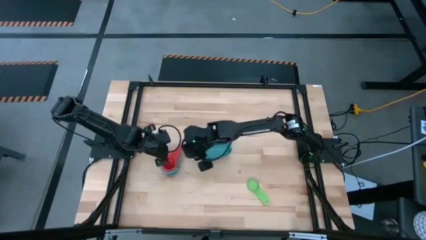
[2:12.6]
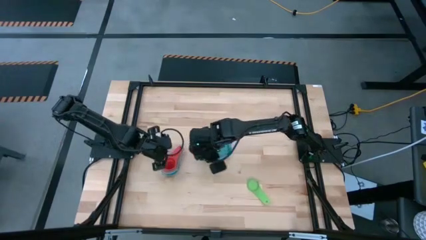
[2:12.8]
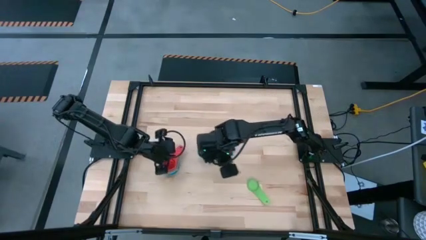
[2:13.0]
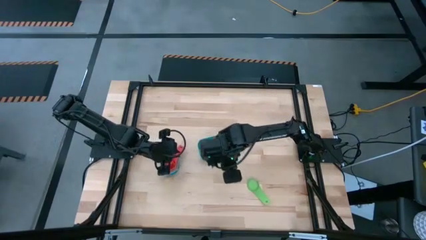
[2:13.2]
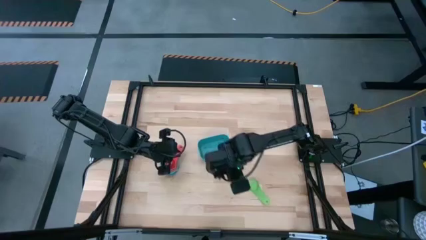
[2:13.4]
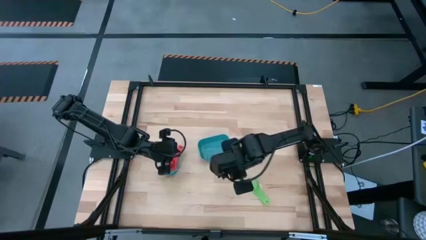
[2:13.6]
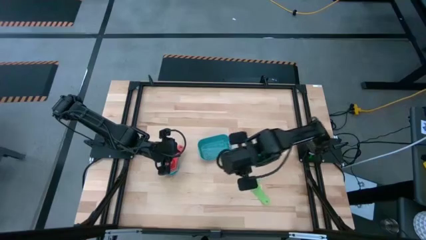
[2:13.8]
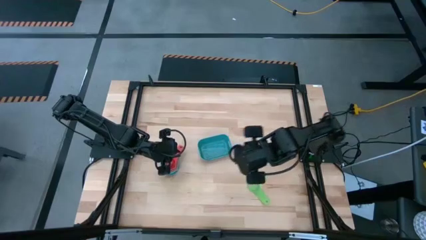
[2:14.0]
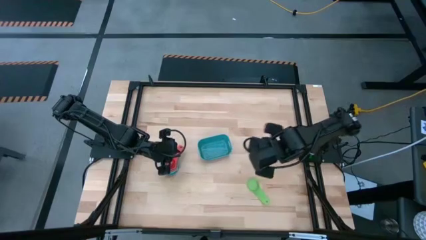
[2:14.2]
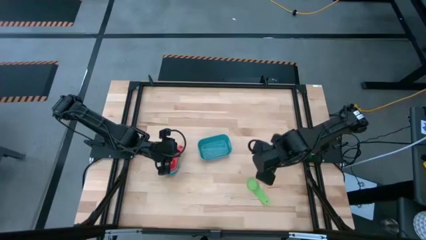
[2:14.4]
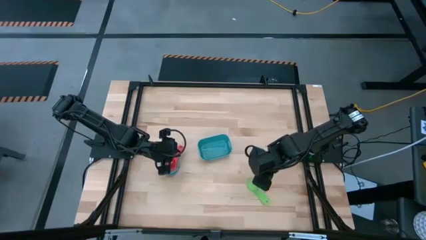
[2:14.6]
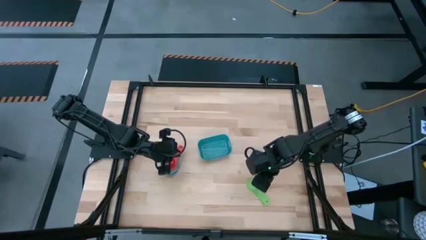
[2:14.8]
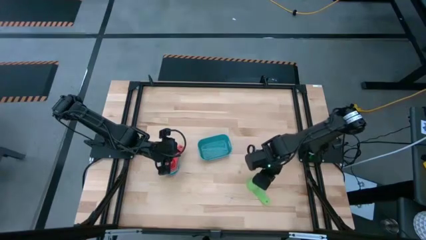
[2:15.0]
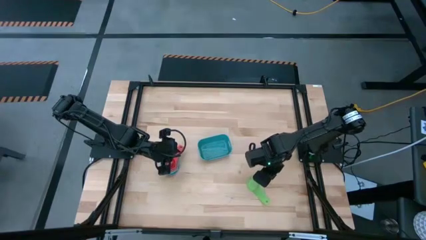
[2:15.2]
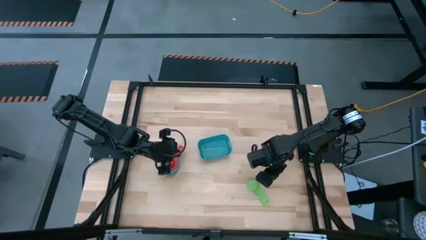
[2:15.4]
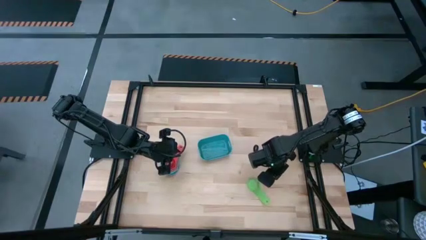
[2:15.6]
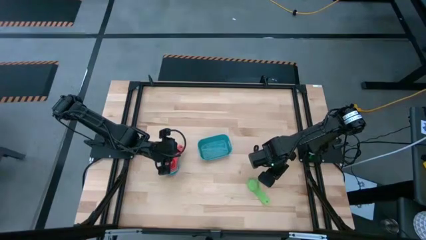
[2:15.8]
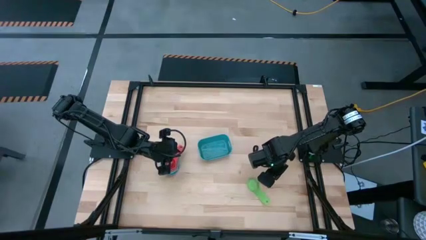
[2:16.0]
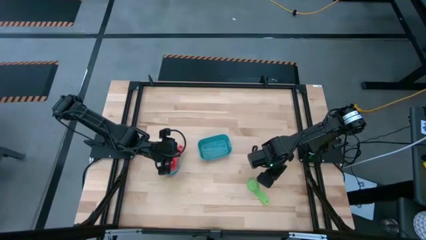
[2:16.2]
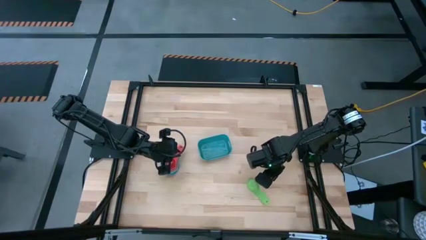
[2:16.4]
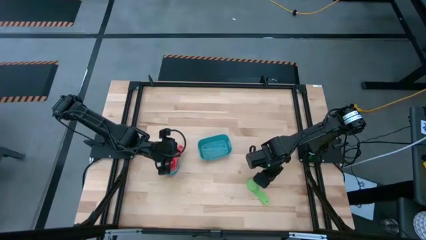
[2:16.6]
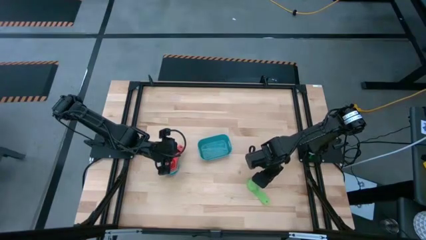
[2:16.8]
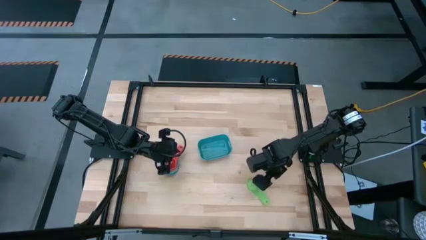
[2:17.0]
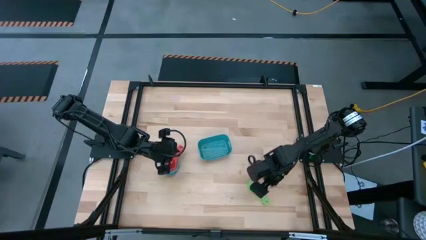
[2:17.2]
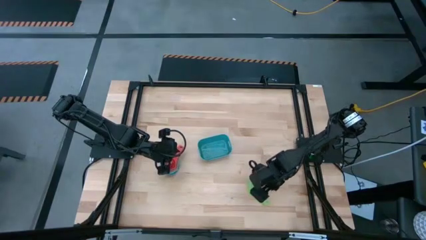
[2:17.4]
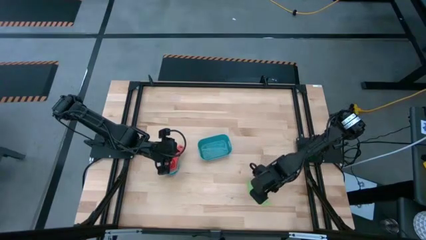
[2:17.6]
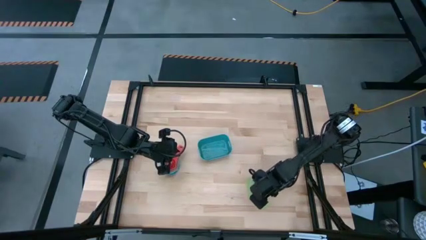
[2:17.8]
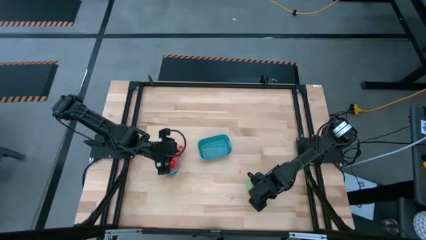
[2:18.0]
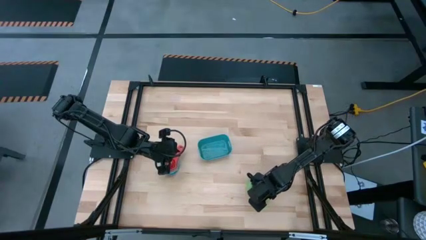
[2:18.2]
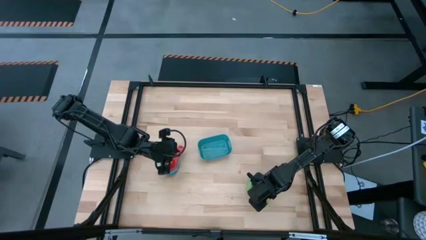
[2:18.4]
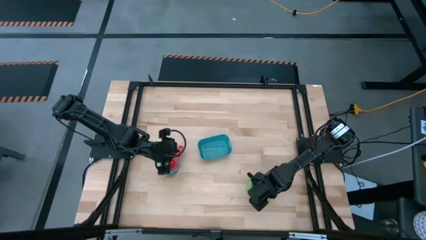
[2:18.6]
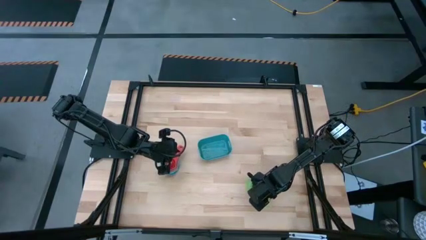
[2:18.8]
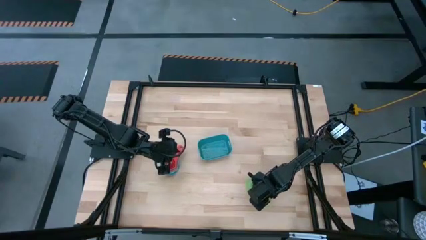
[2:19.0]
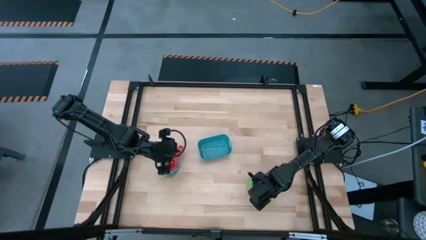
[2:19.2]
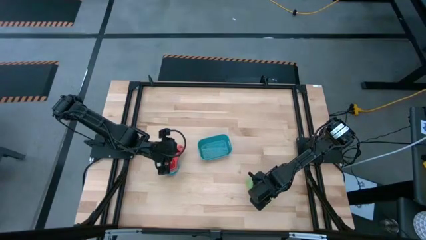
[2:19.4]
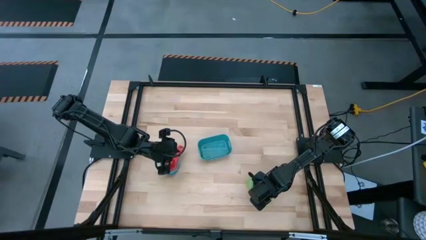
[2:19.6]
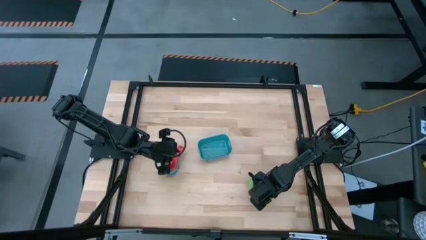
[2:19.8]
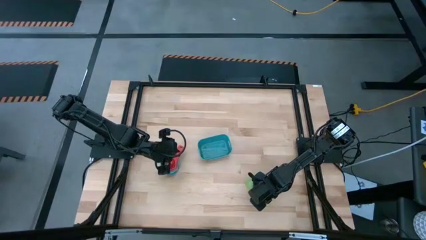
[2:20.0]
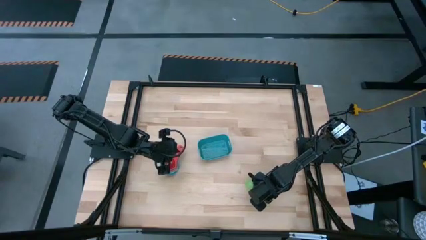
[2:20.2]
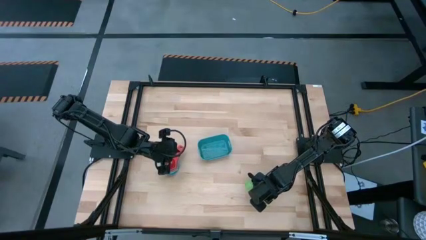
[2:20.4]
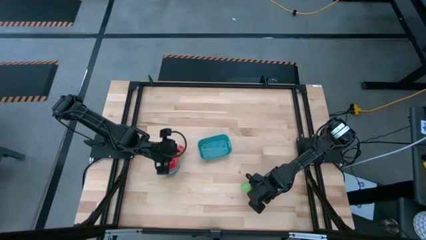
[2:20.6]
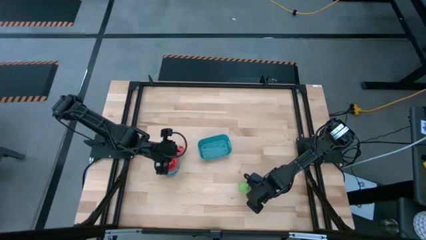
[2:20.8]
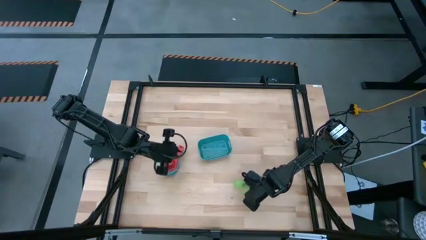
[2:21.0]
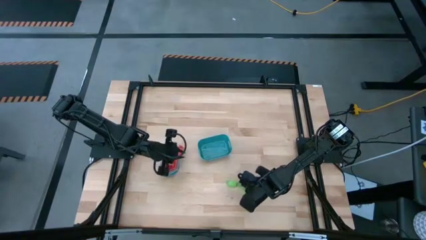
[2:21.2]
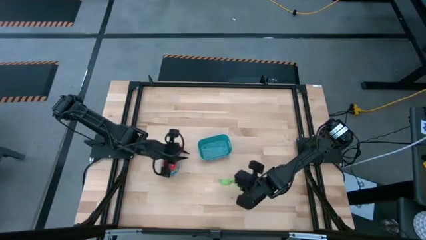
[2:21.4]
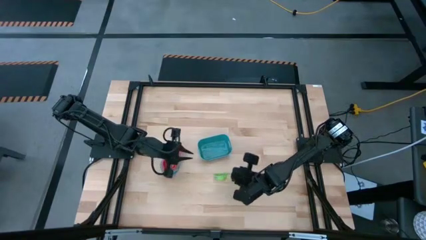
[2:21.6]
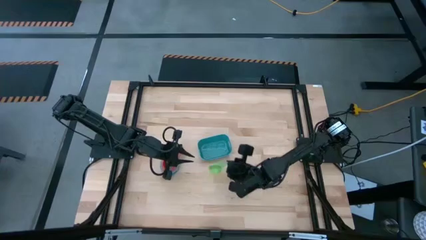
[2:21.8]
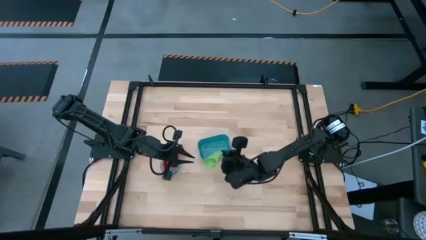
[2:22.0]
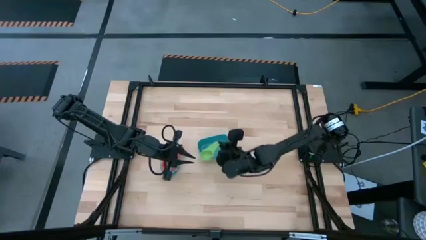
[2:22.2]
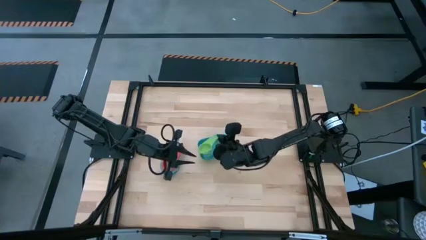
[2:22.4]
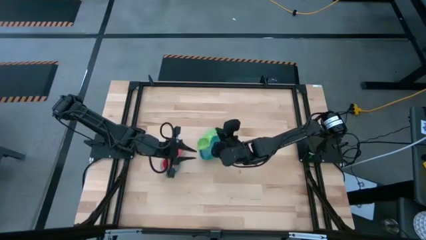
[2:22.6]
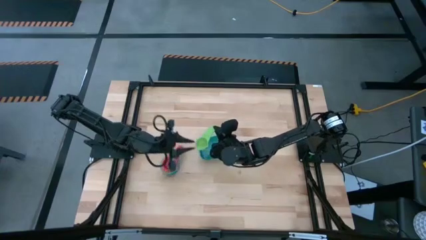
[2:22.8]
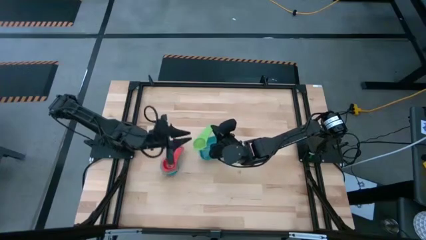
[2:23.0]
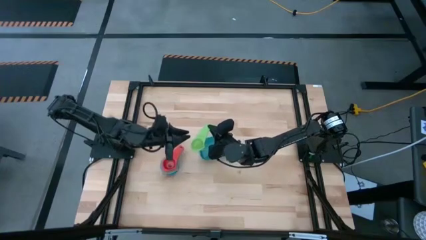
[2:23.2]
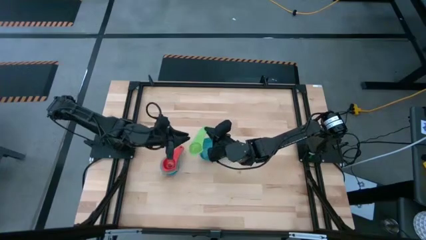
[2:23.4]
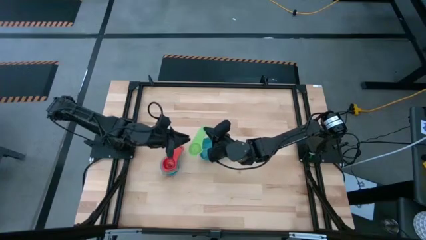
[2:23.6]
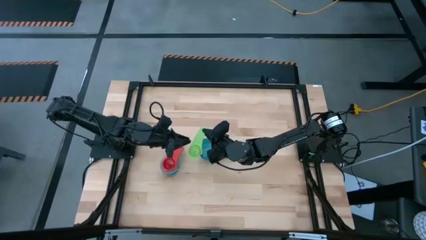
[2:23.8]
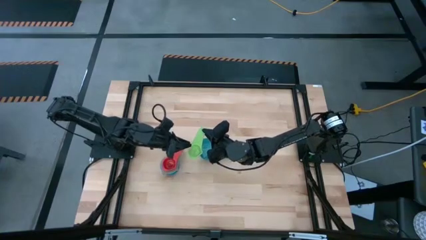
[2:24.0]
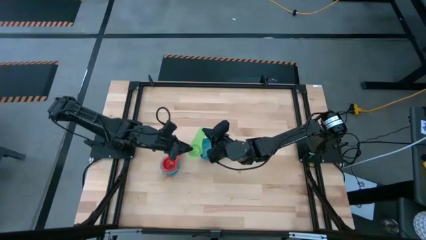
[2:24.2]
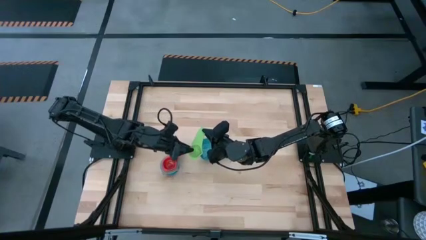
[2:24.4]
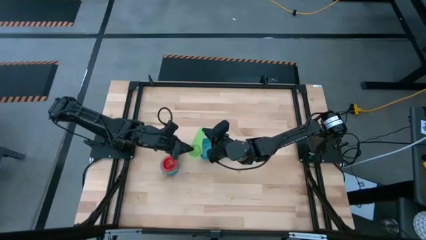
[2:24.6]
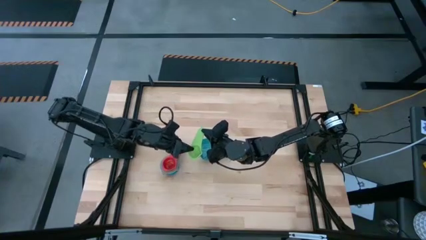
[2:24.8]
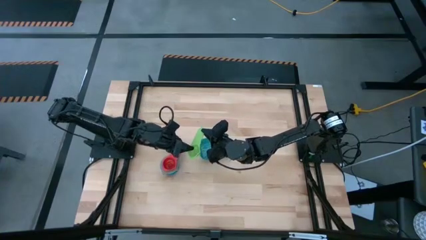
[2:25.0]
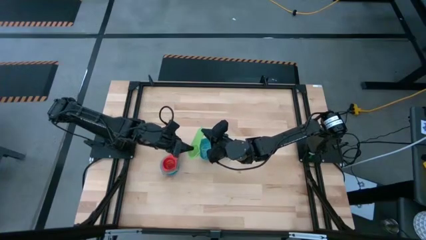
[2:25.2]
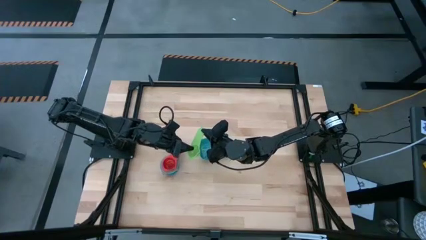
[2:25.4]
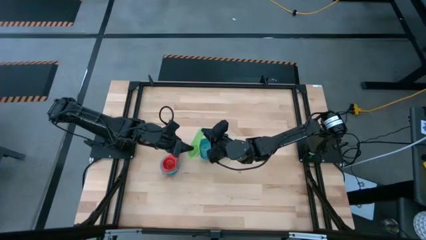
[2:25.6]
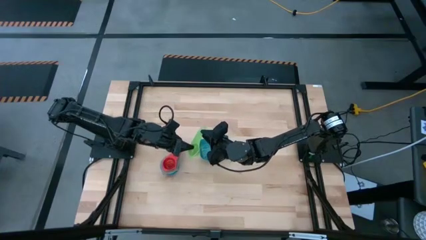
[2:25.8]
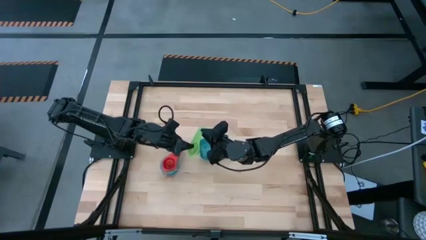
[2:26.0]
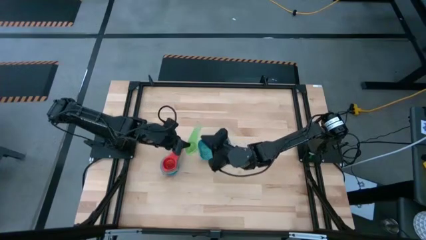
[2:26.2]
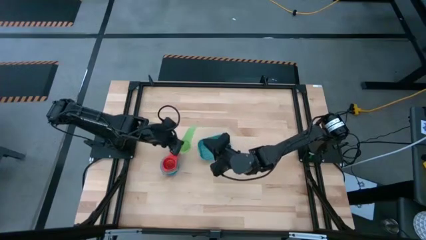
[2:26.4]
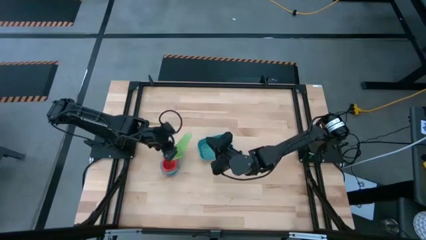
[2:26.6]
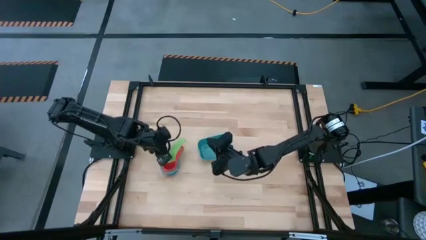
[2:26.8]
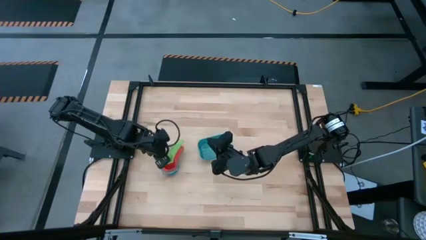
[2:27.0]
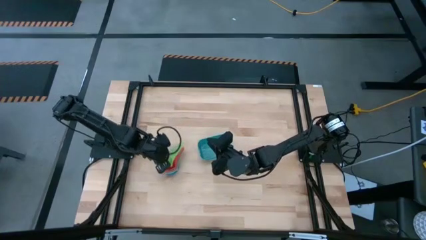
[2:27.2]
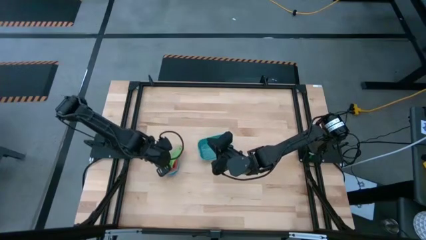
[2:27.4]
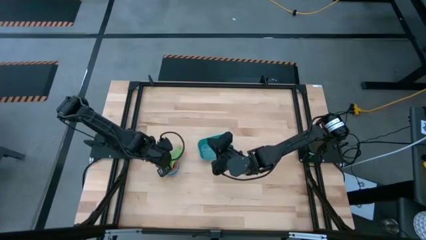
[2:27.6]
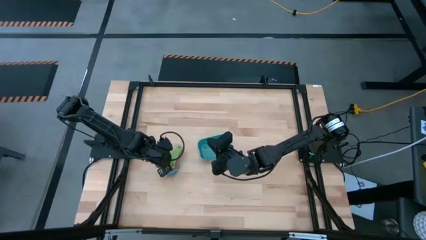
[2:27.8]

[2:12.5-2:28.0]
Task: Nest measuring cups in basket
Stack the green measuring cup on top of the red measuring cup

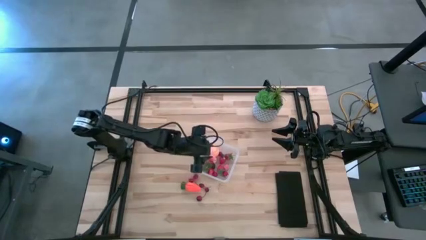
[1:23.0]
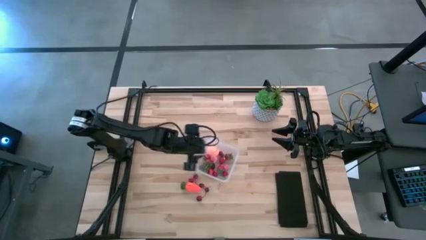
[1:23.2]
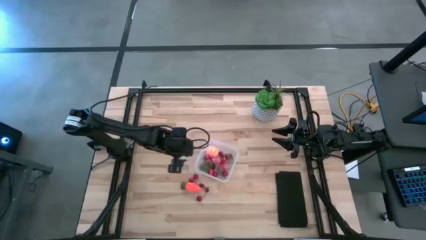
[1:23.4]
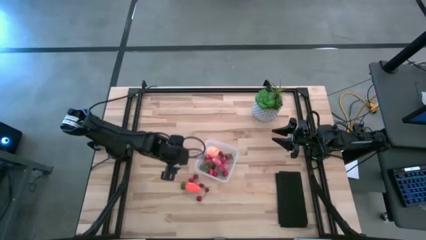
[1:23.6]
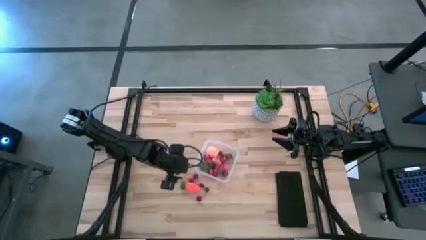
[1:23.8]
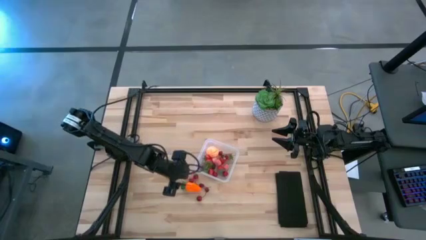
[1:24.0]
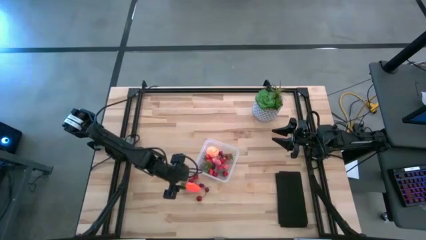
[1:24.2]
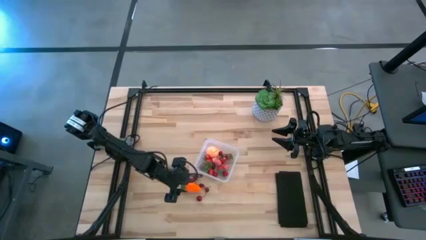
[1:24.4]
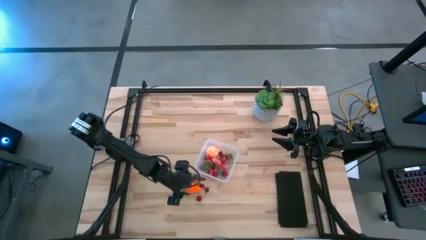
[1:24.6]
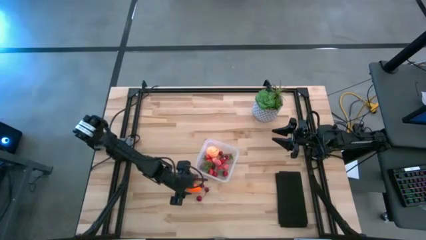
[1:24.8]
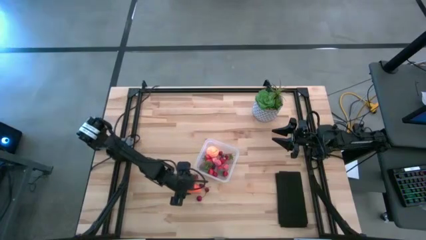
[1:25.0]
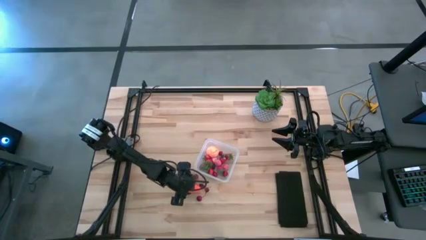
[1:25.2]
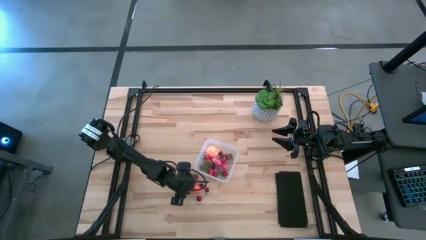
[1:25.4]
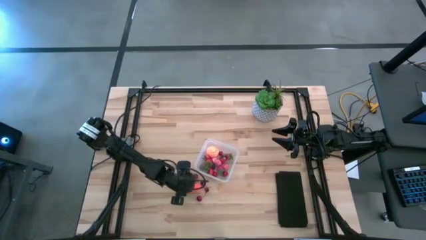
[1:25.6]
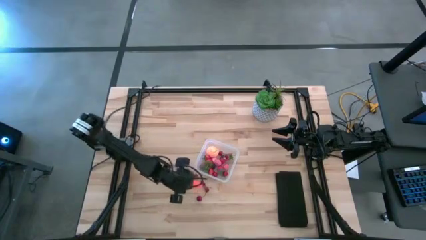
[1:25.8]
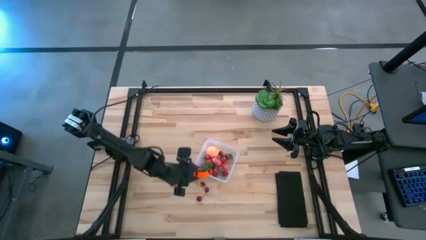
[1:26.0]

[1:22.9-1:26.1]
Task: Pick and placing Produce into tupperware
Put the orange carrot into the transparent container
